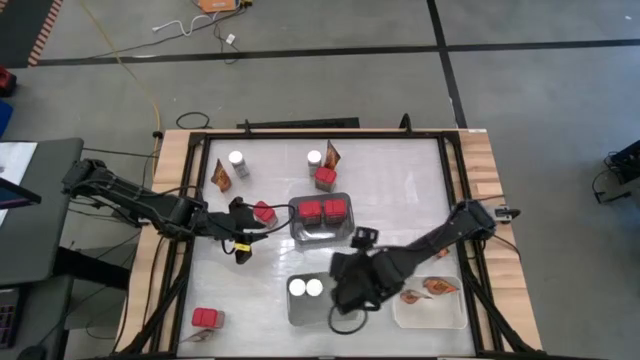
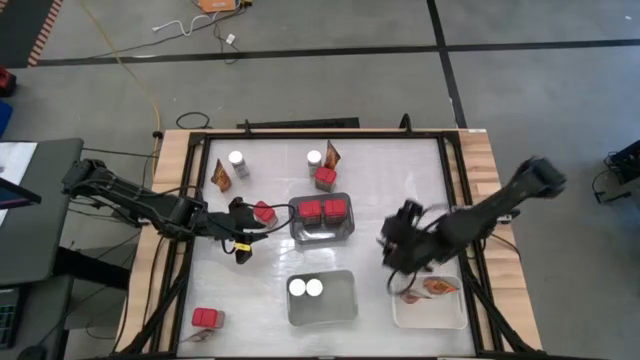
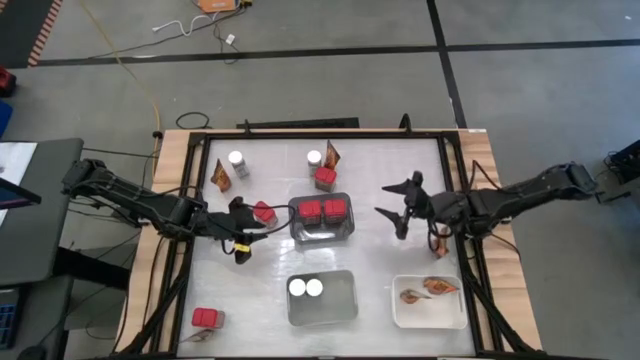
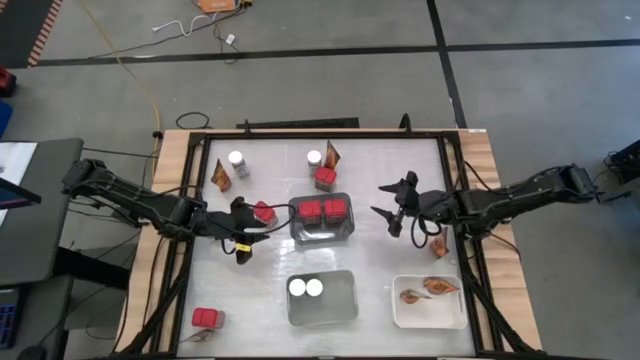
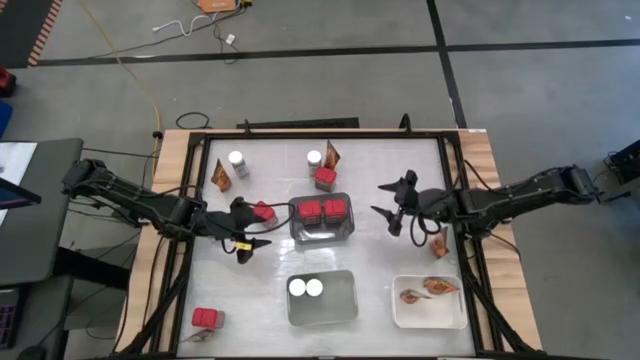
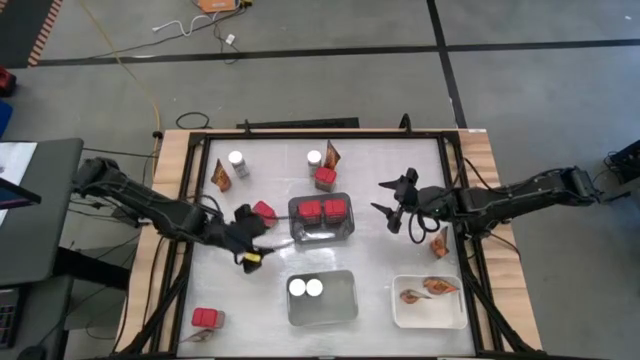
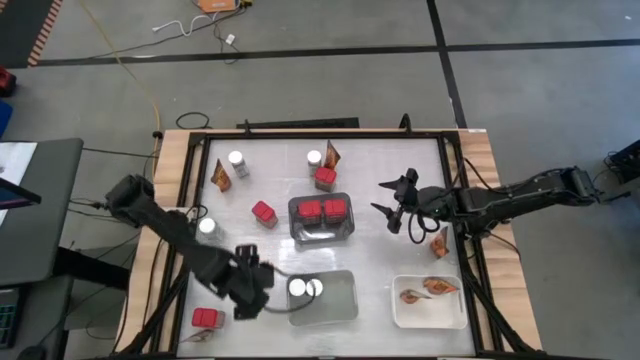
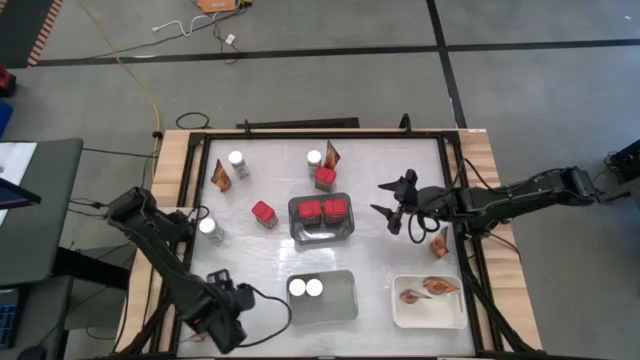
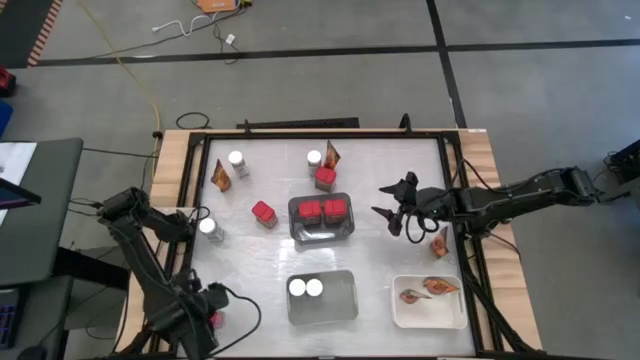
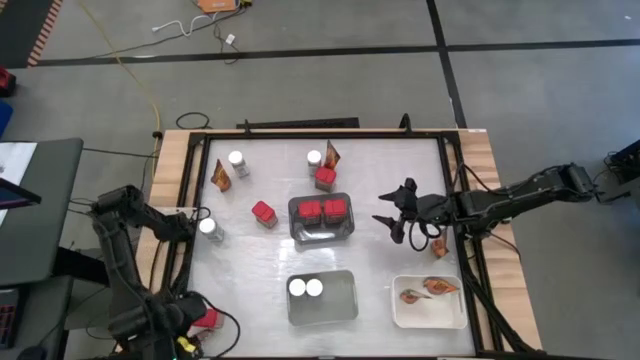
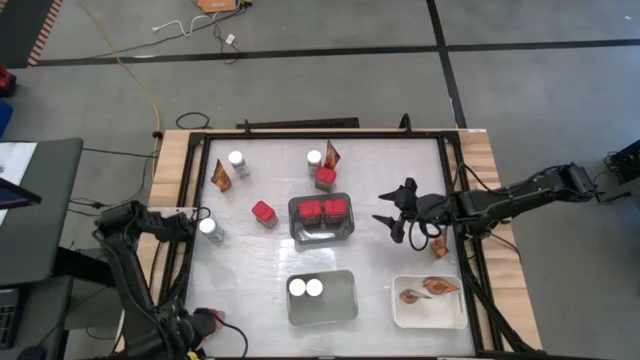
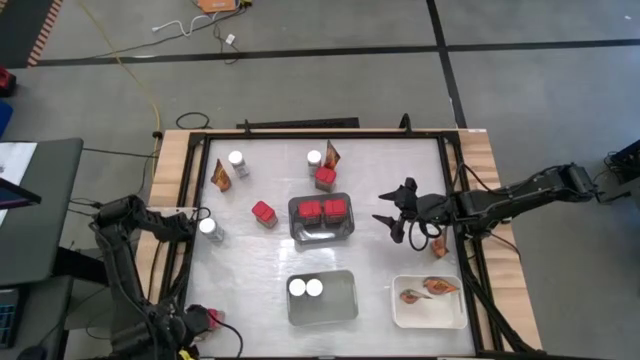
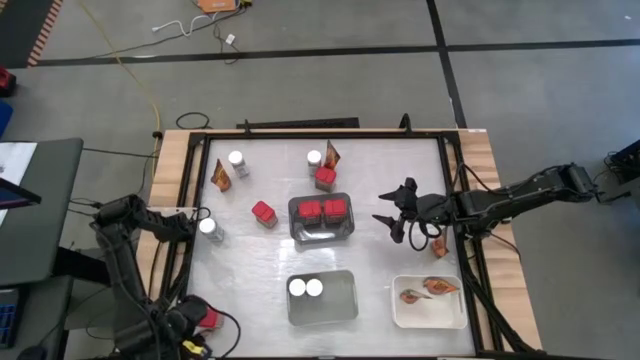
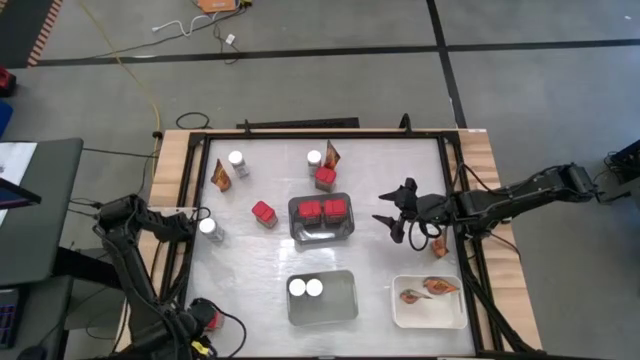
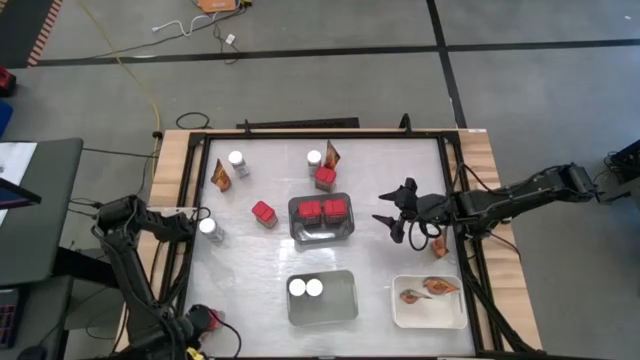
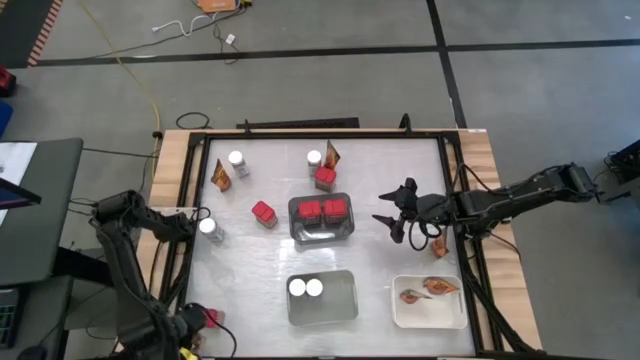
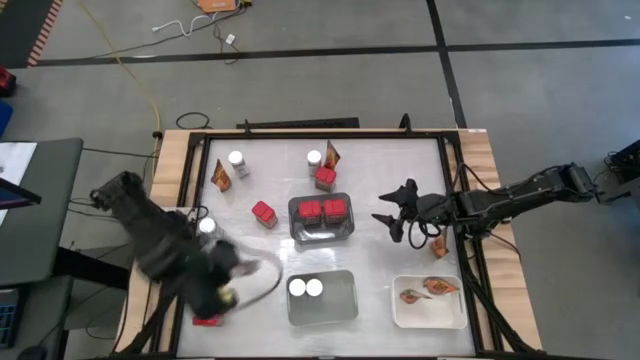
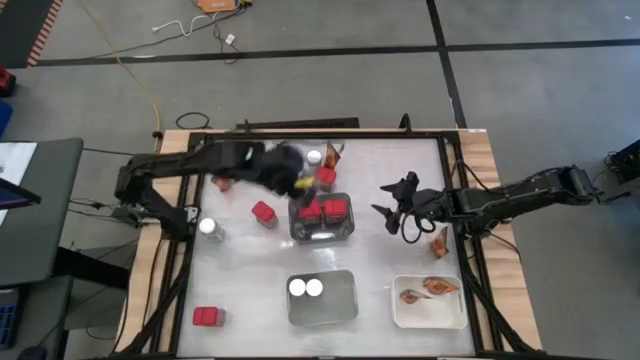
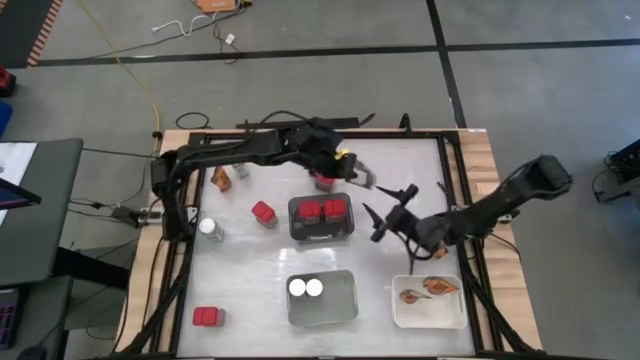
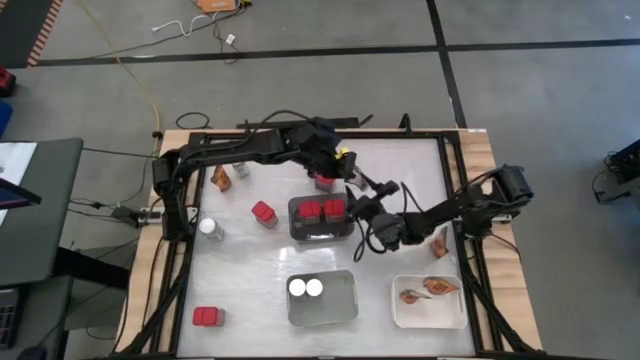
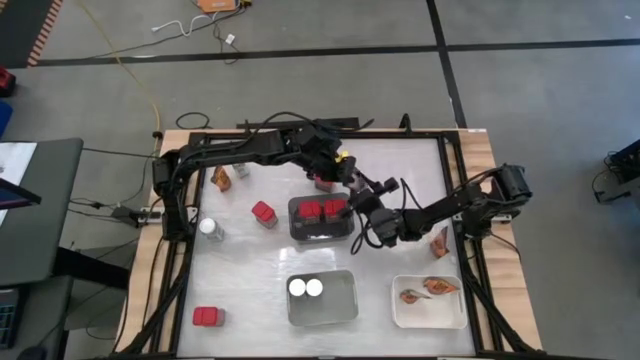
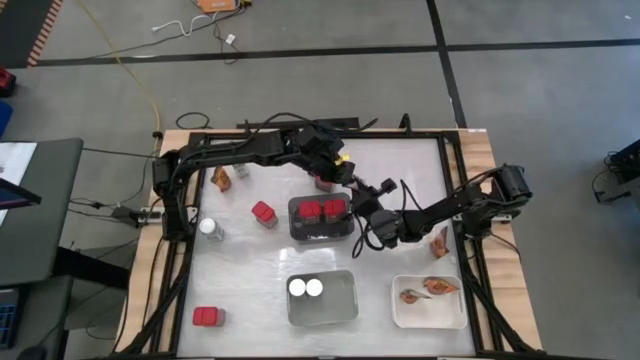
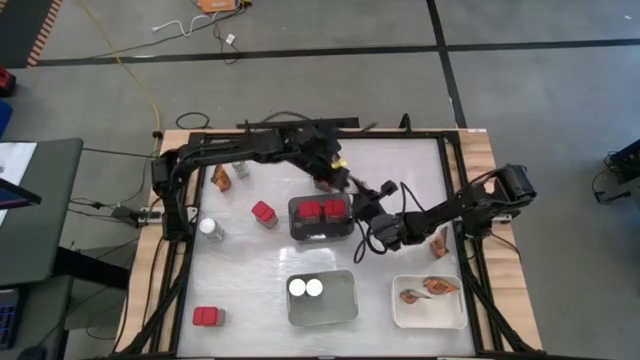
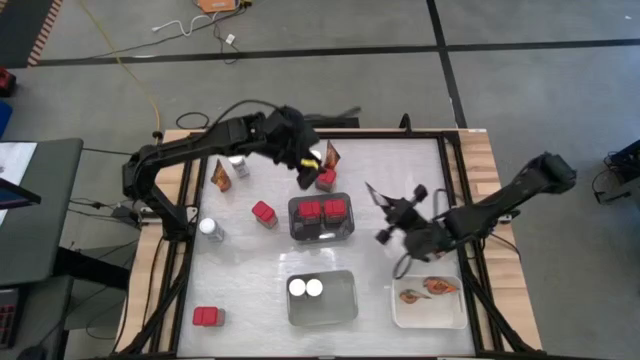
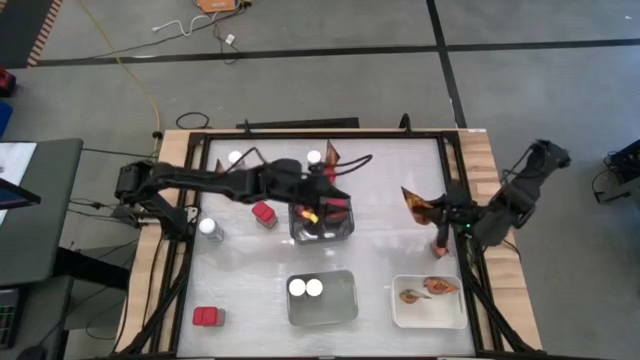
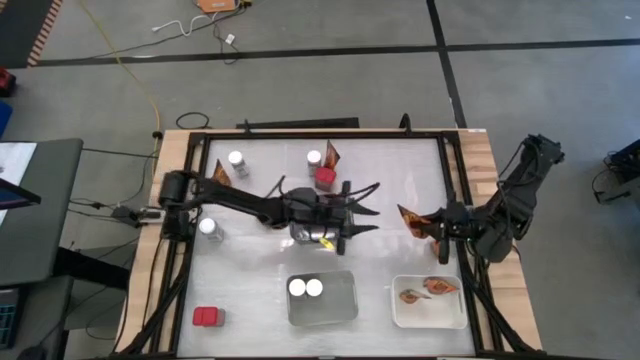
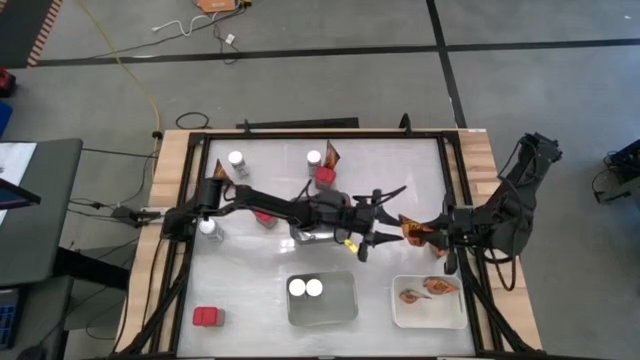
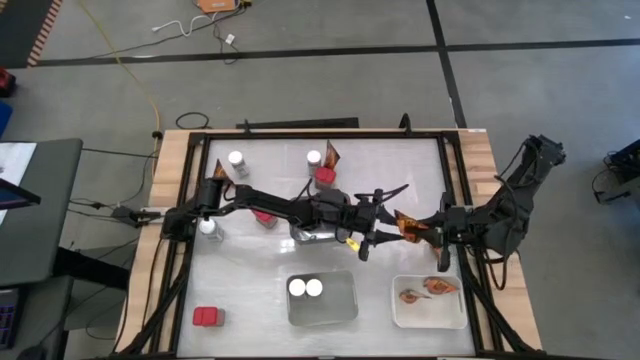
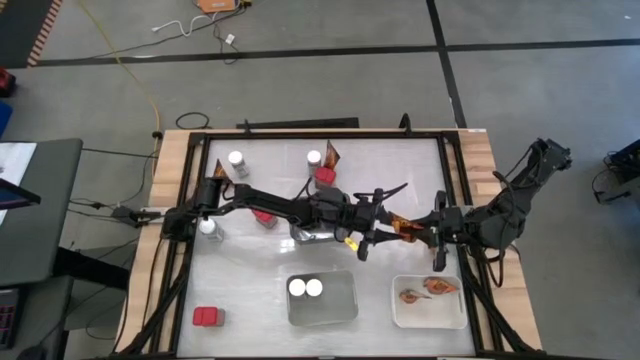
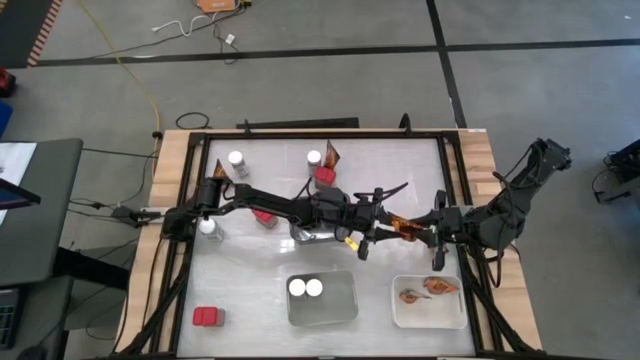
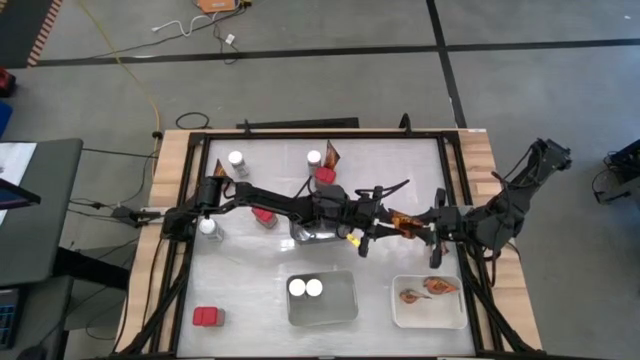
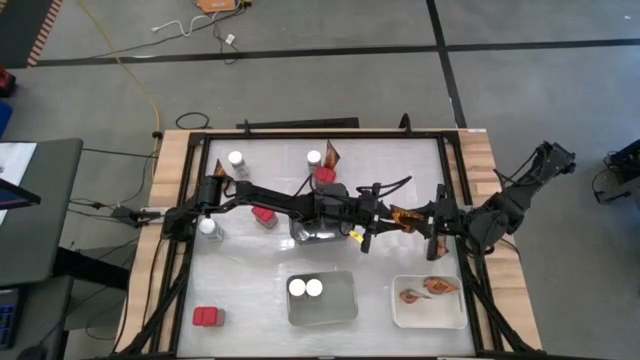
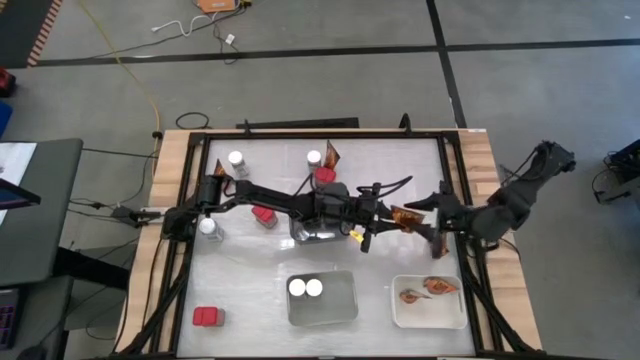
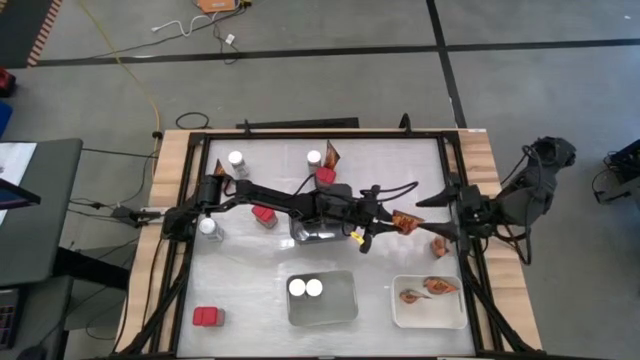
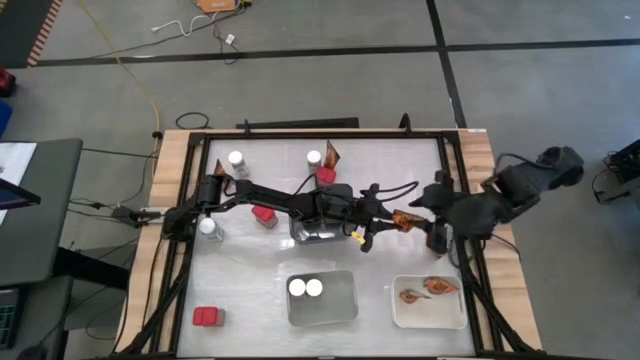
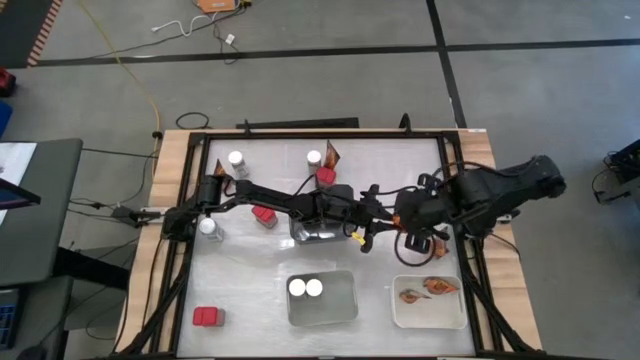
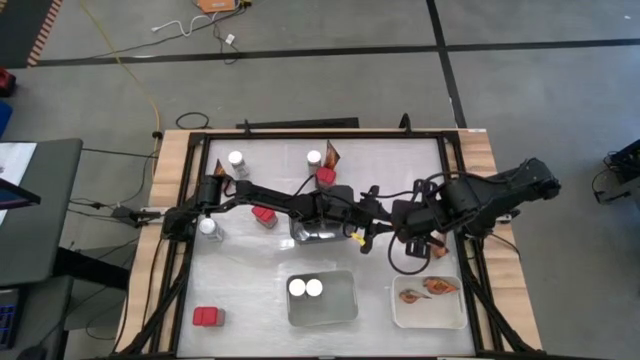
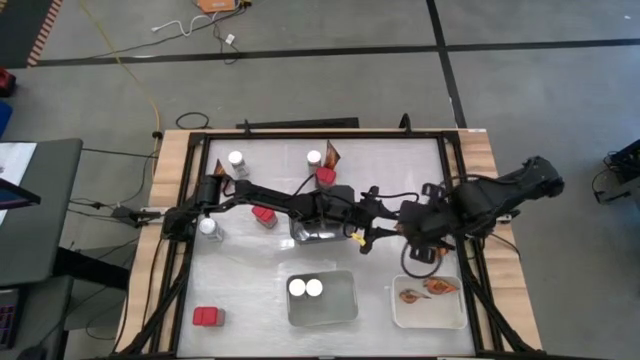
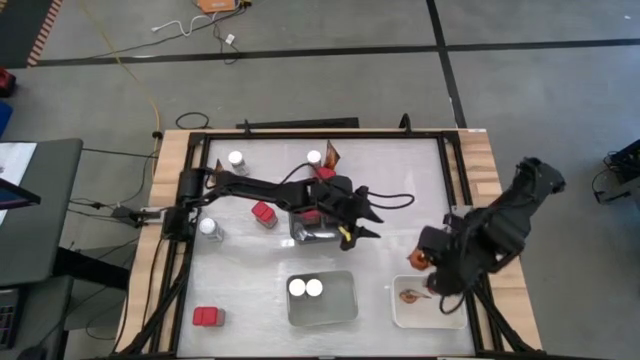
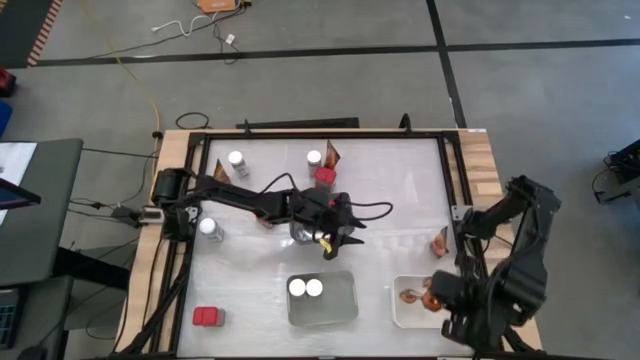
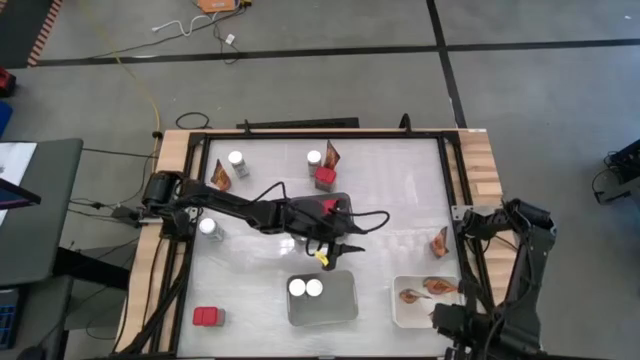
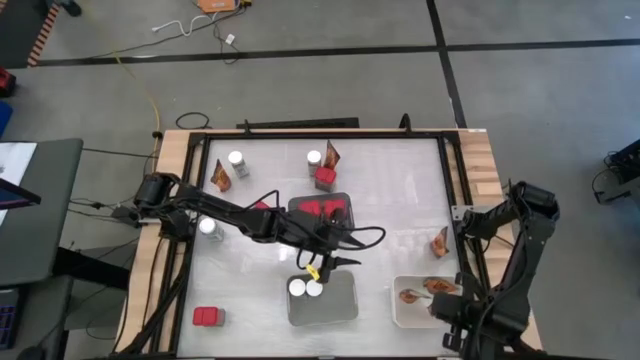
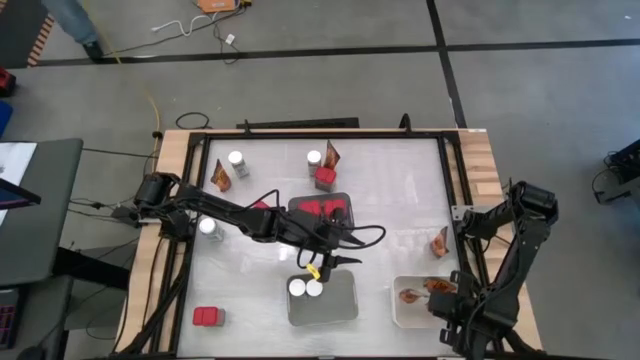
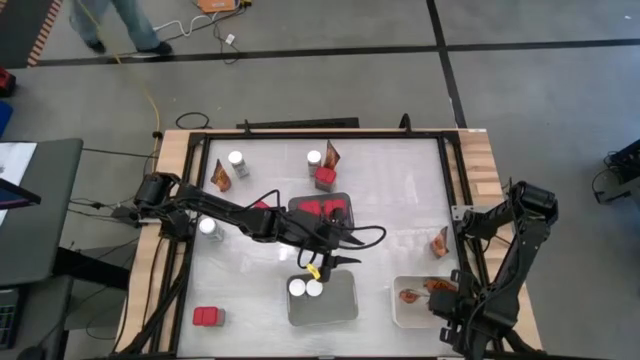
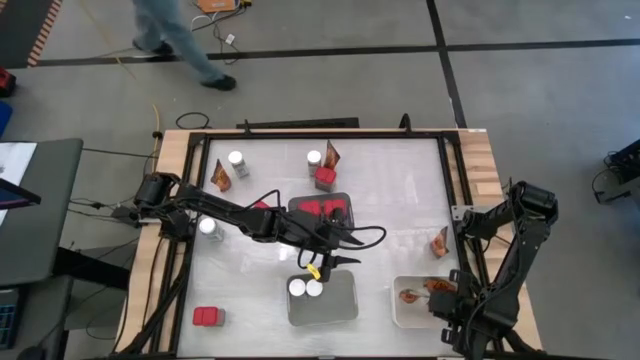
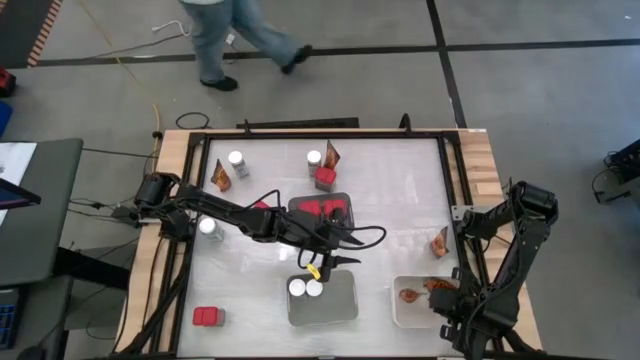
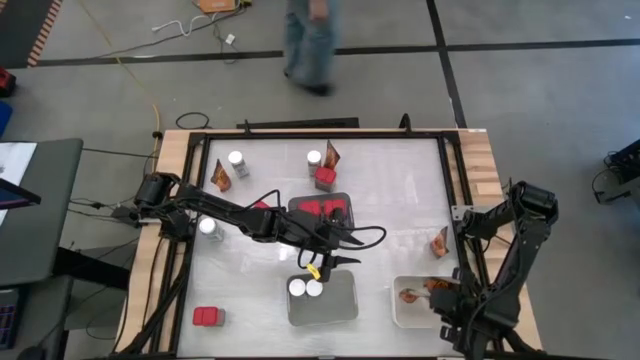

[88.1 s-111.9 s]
Task: Sort spices by type
Put the orange seasoning pack into the white bin
